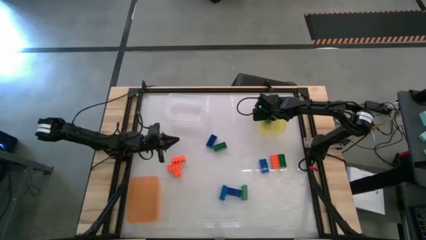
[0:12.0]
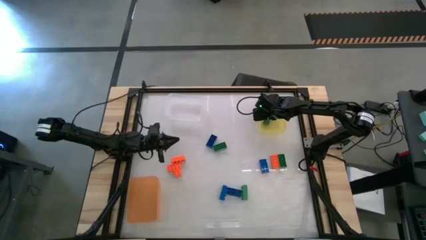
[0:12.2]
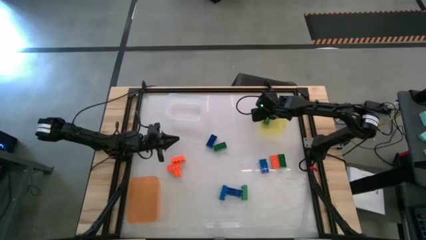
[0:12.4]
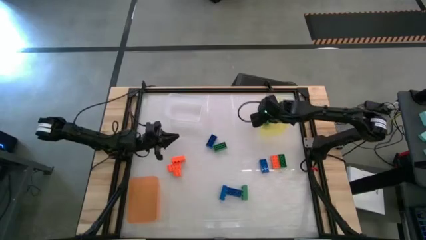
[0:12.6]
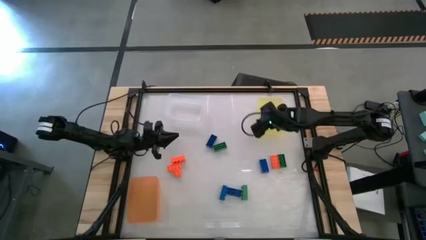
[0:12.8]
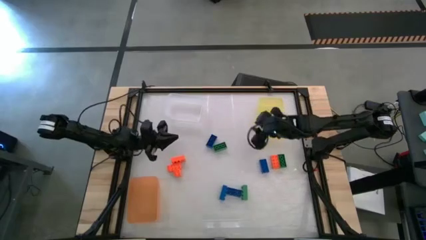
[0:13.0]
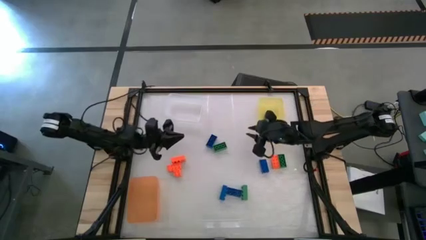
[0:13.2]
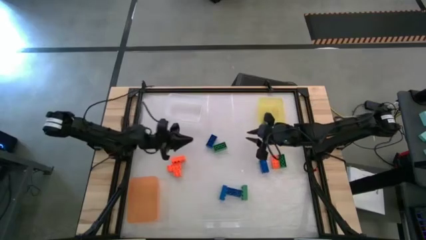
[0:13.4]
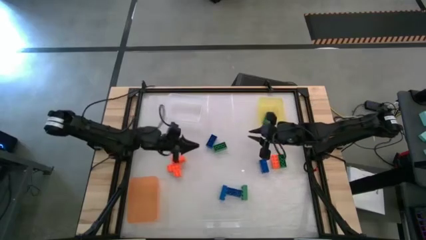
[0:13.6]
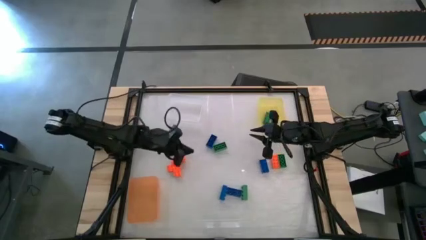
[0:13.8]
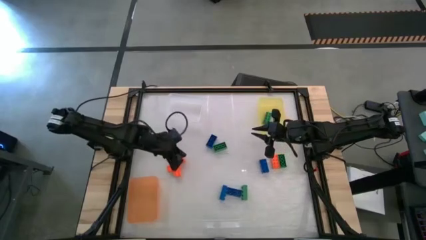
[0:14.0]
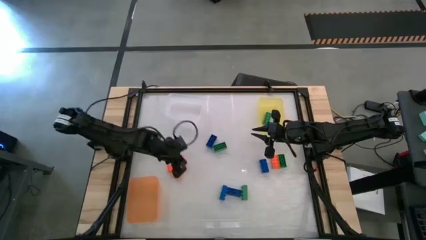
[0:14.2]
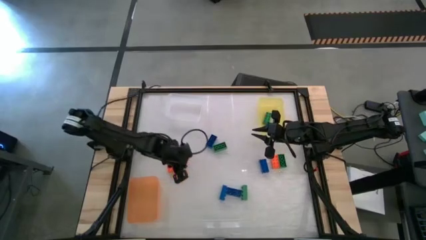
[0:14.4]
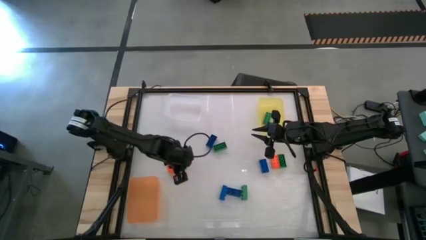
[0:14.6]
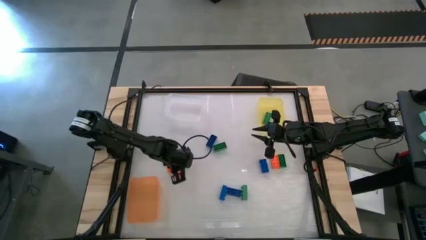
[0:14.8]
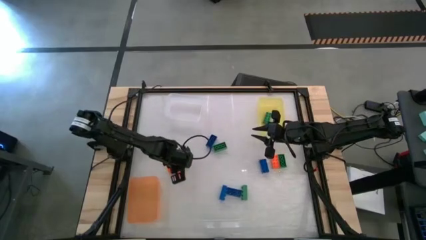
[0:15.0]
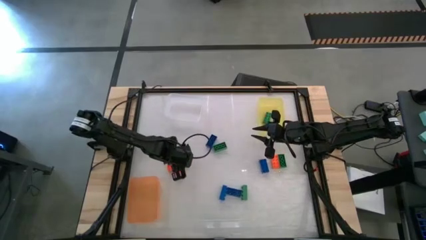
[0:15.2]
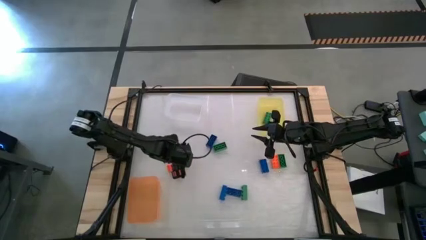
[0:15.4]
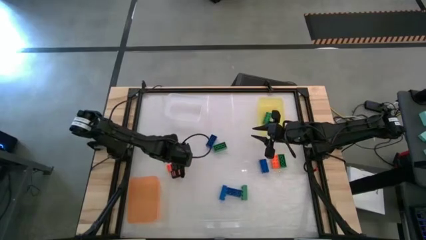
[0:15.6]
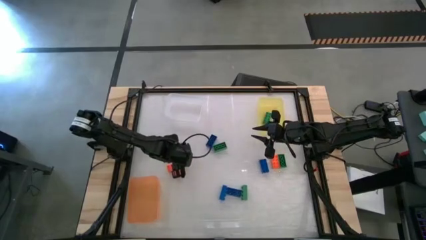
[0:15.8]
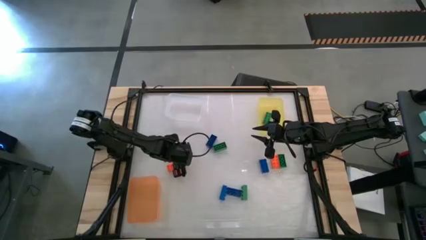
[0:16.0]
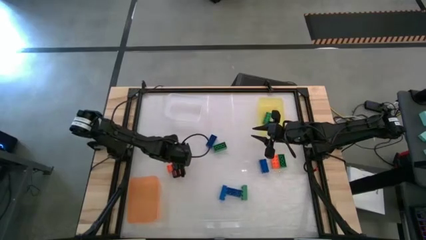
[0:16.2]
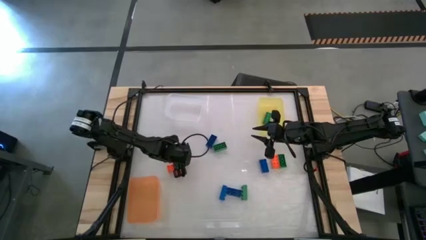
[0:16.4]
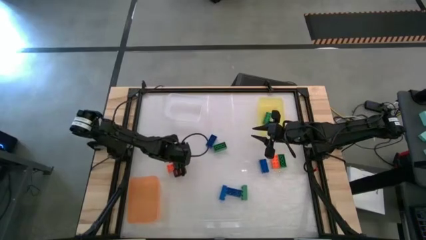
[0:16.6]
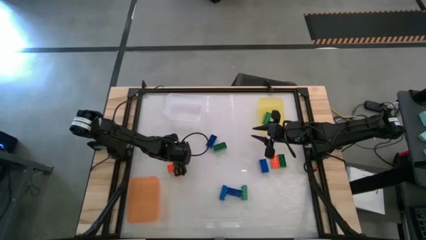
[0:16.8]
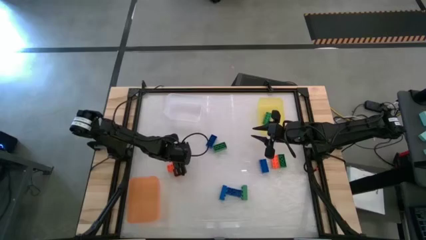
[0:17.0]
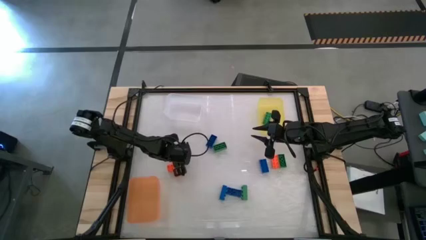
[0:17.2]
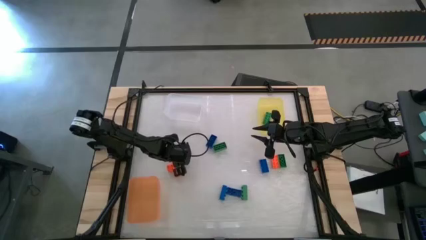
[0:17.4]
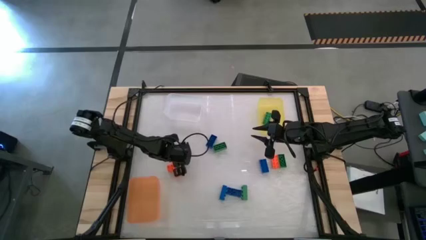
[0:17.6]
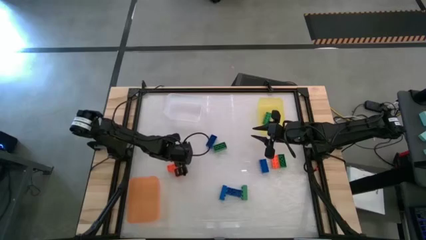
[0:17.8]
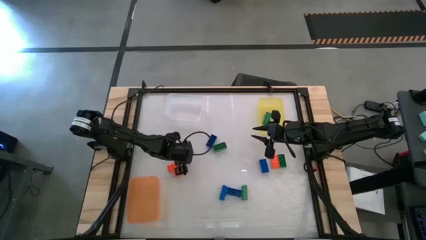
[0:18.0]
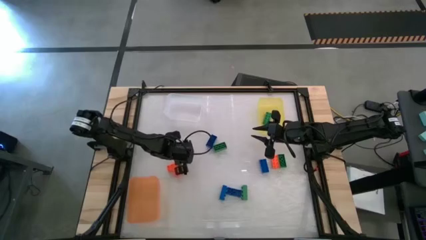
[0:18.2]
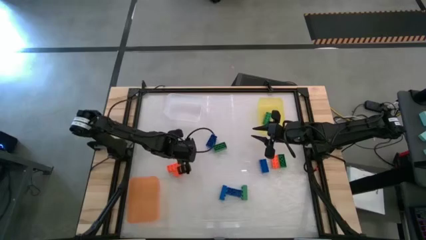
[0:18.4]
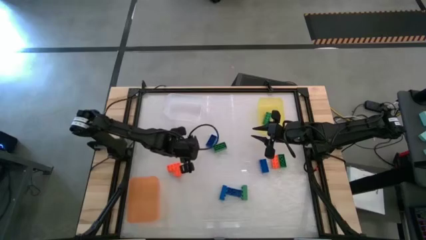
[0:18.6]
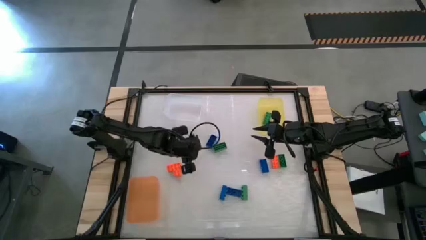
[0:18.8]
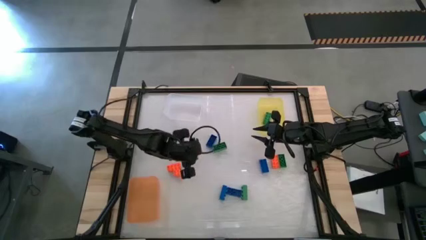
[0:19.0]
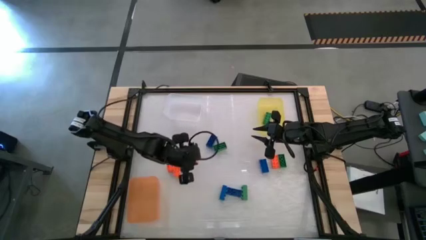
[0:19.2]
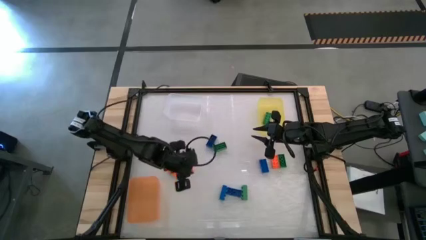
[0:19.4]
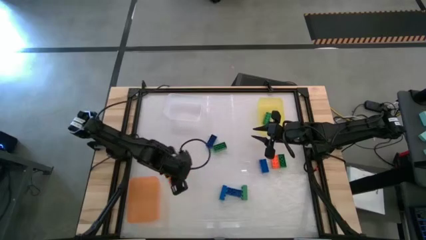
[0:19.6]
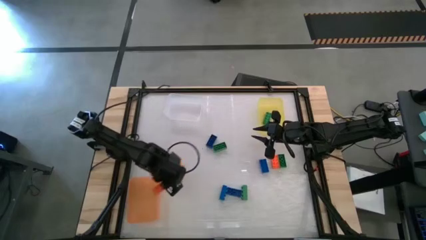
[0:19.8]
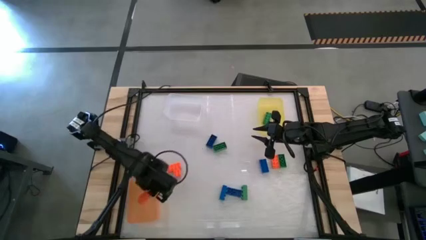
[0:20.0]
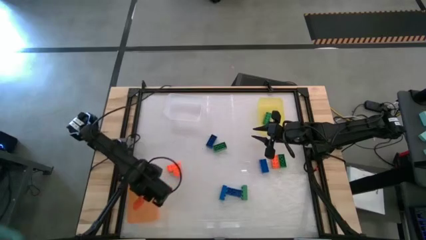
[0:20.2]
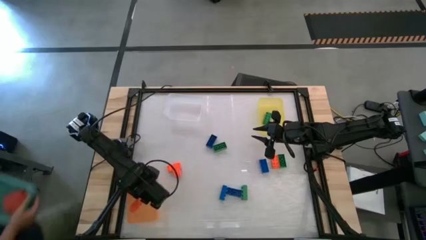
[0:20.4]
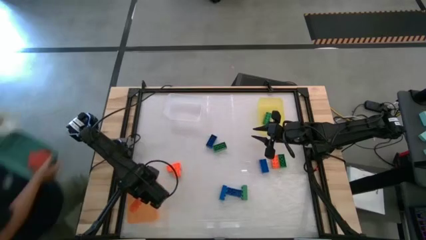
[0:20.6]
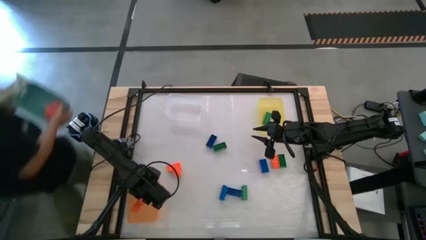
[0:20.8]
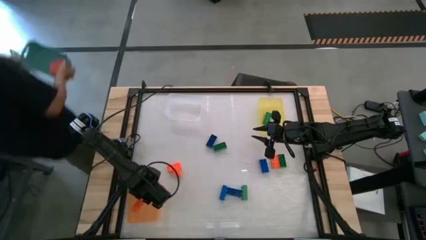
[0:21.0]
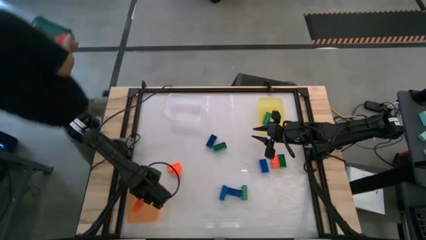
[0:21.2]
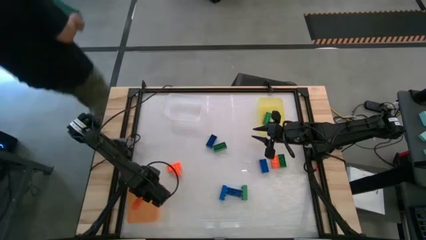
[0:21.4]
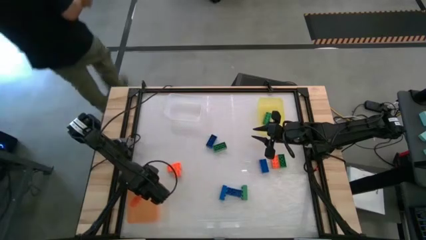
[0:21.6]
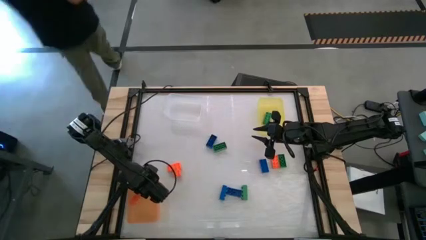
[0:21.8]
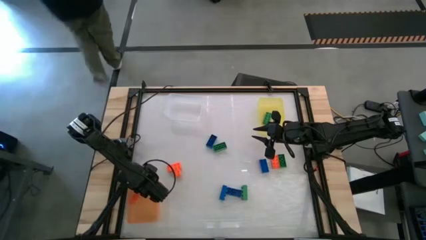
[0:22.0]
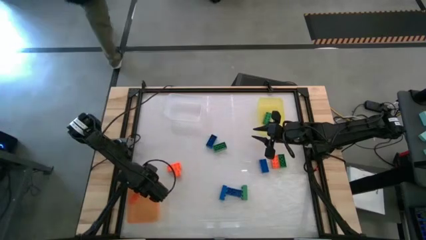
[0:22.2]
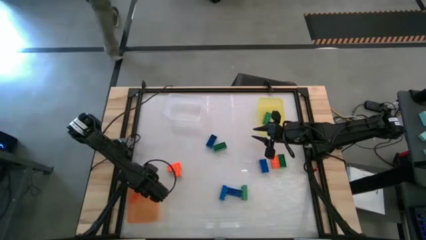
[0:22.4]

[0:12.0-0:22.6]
Task: Sort & place blocks by color
Put the orange game piece into the orange bin

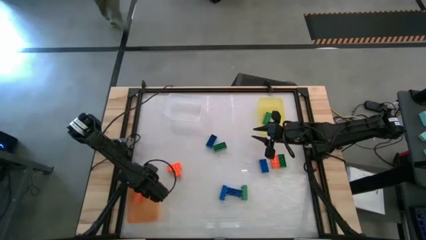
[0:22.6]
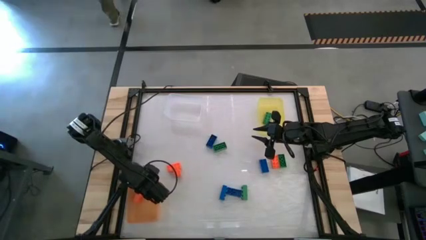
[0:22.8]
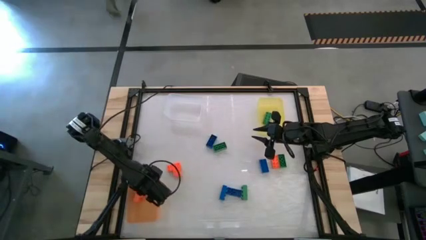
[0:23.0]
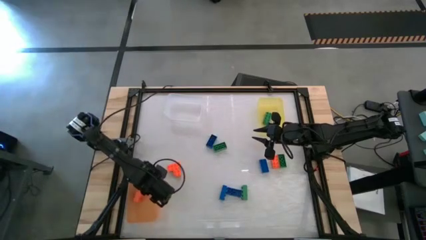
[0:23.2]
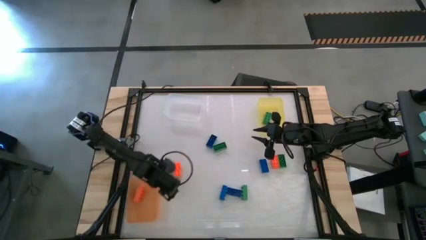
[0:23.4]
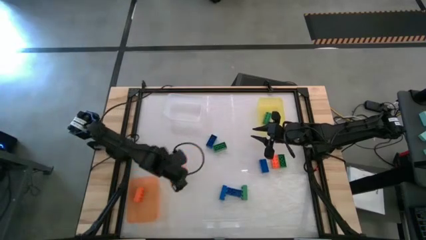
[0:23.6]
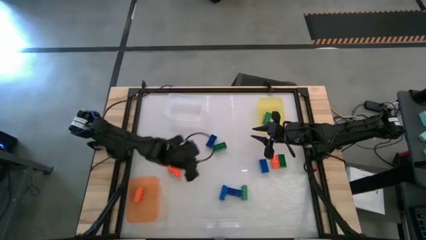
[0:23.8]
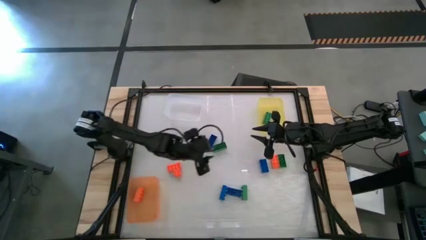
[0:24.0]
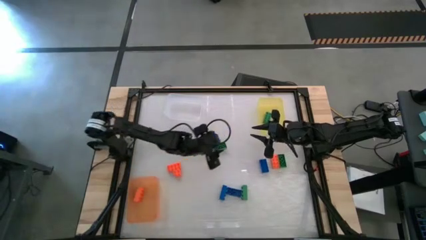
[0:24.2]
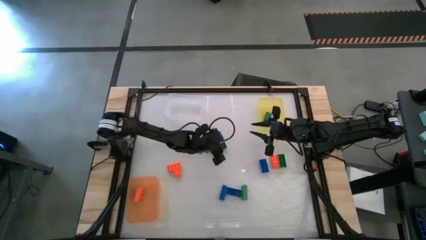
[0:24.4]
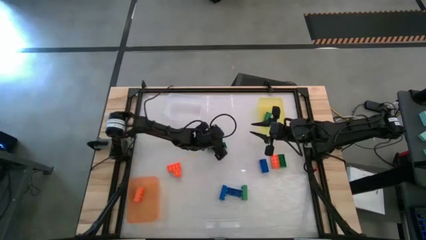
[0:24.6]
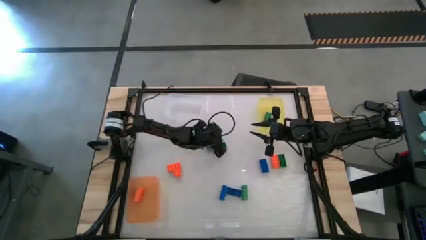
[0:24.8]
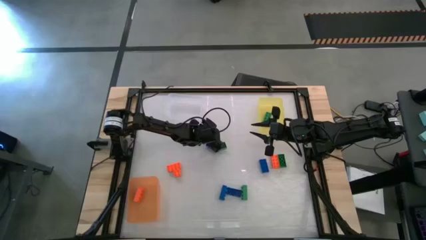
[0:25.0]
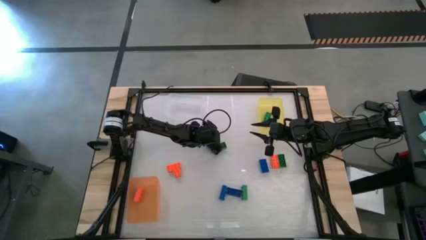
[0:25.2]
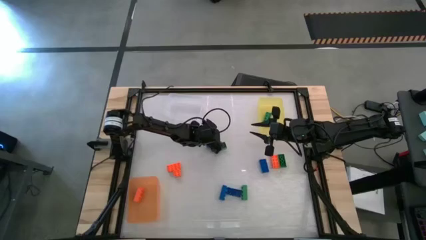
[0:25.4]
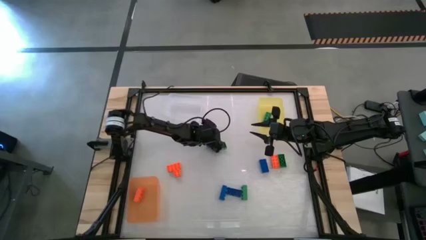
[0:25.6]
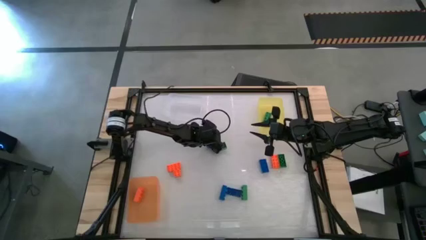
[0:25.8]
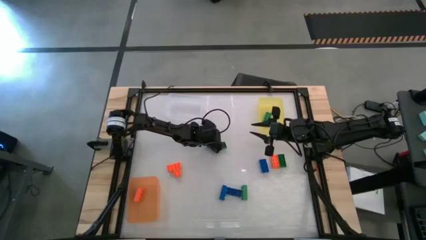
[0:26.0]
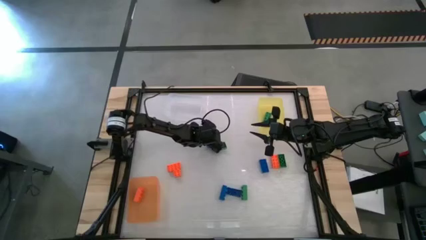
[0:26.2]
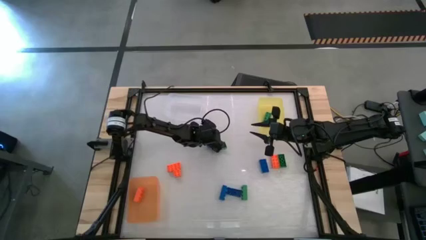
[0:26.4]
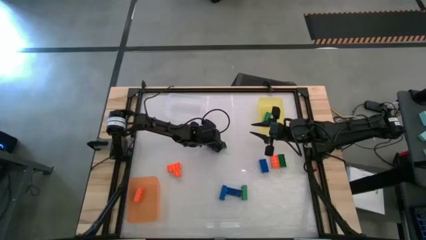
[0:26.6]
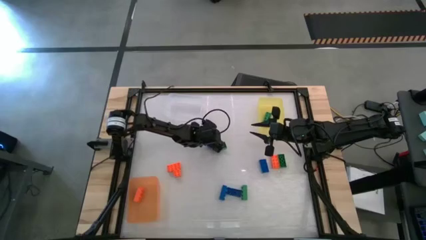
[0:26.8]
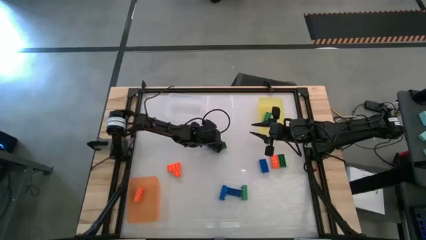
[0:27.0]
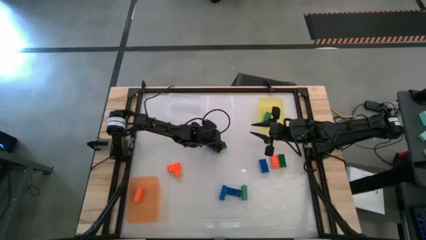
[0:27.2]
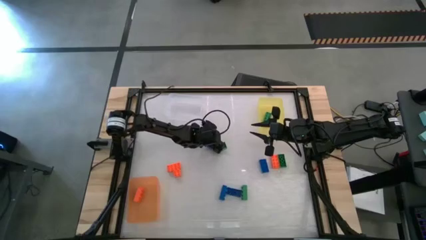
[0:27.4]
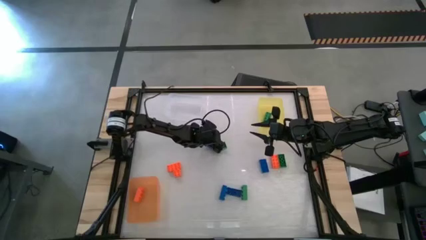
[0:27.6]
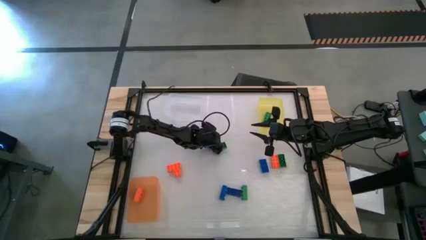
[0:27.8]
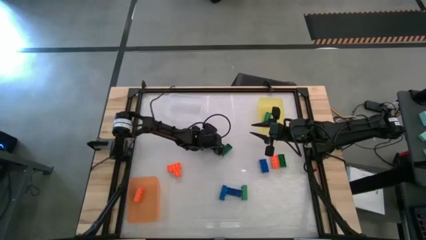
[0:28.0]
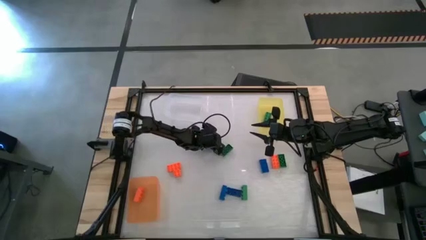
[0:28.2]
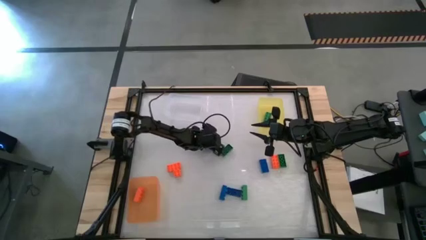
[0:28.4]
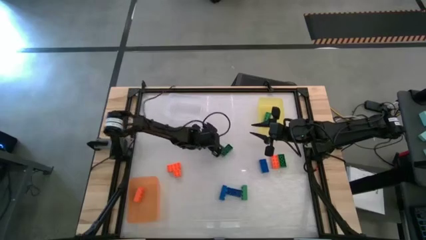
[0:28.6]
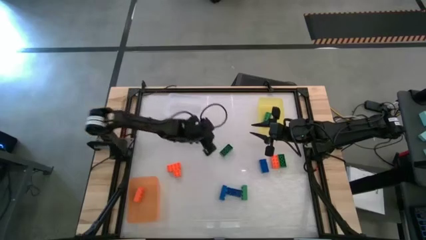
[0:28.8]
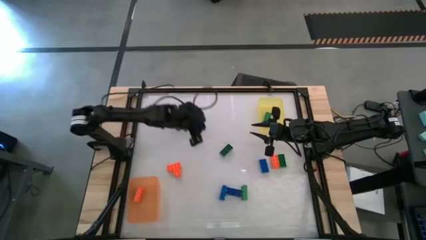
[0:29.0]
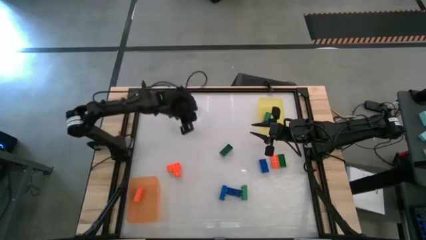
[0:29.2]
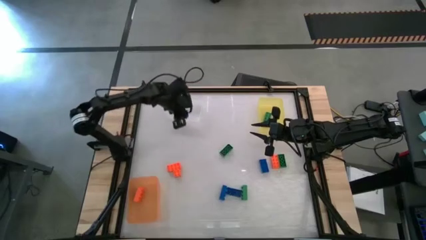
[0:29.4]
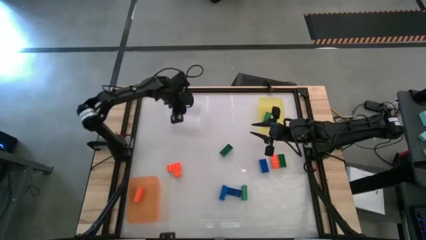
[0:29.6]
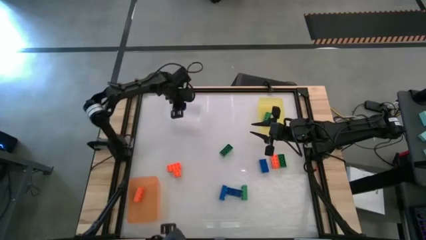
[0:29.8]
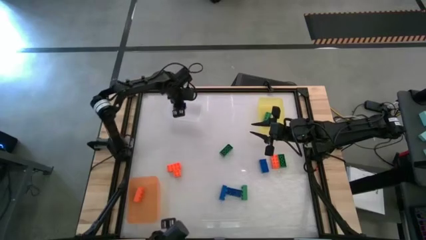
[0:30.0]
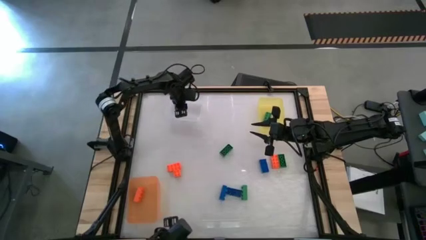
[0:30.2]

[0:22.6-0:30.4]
Put the blue game piece into the transparent bin
